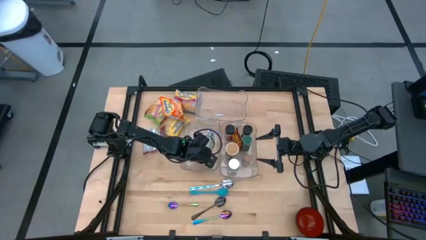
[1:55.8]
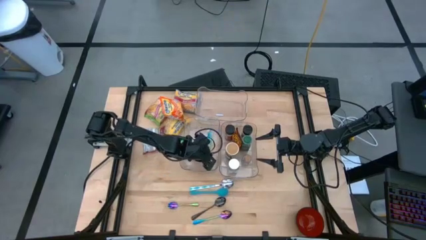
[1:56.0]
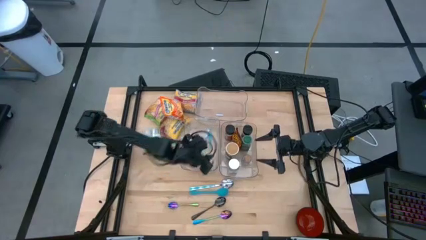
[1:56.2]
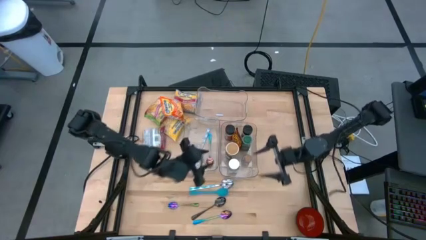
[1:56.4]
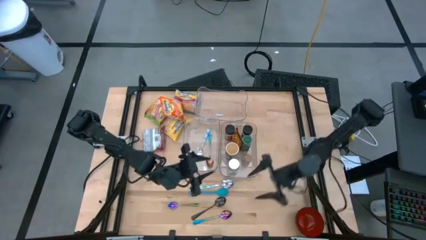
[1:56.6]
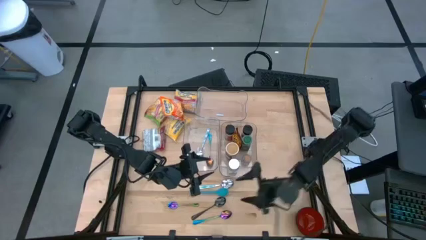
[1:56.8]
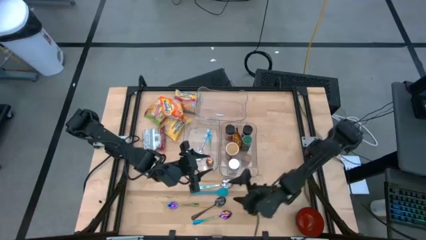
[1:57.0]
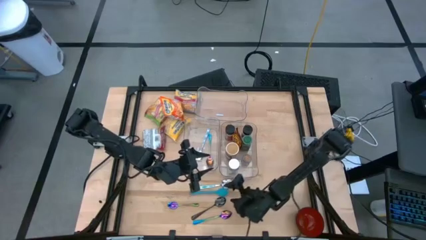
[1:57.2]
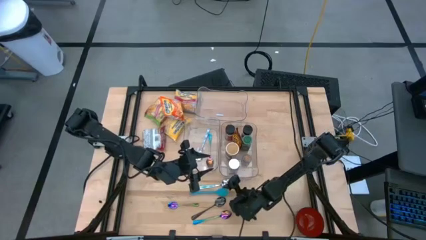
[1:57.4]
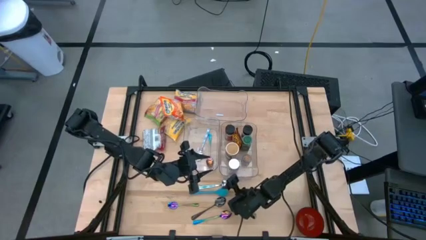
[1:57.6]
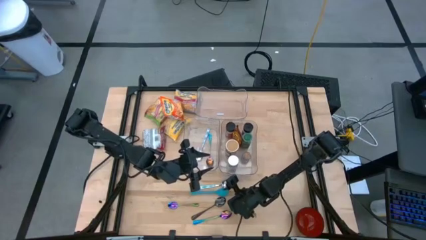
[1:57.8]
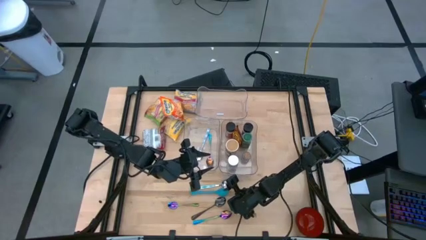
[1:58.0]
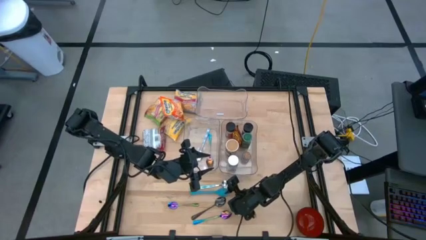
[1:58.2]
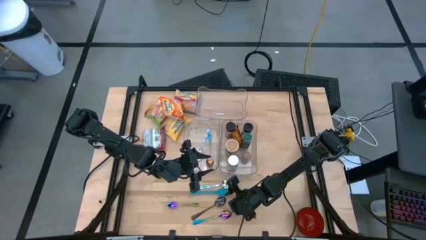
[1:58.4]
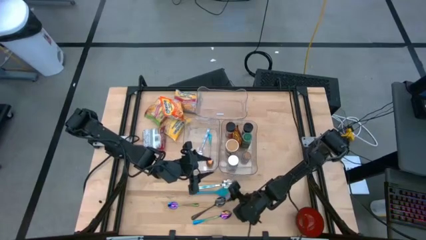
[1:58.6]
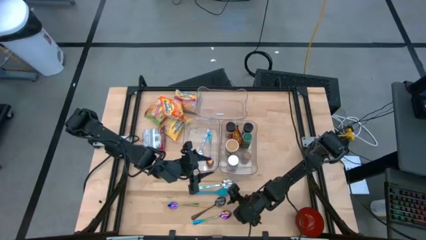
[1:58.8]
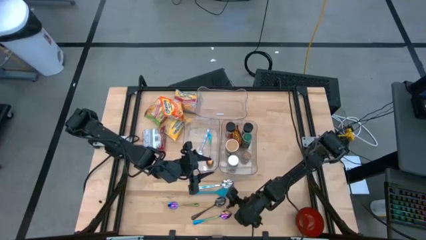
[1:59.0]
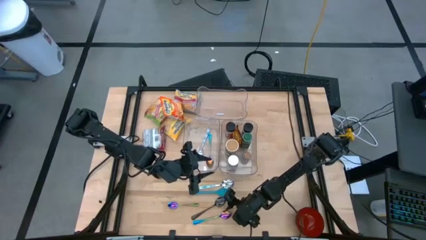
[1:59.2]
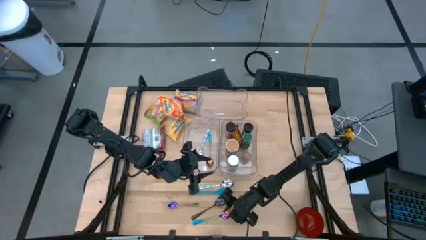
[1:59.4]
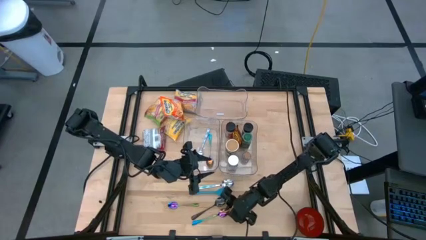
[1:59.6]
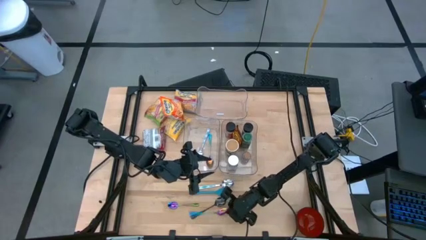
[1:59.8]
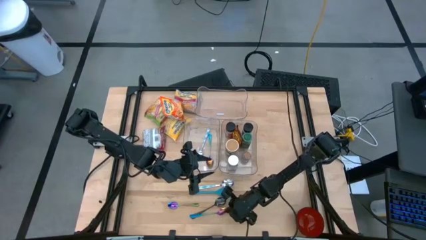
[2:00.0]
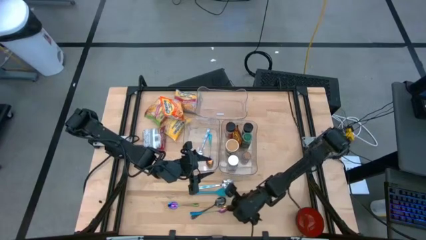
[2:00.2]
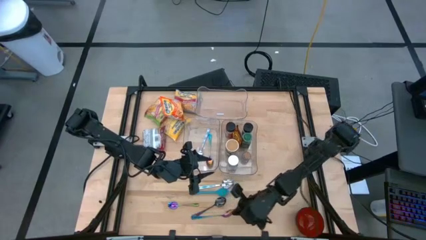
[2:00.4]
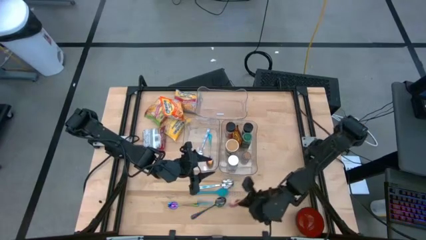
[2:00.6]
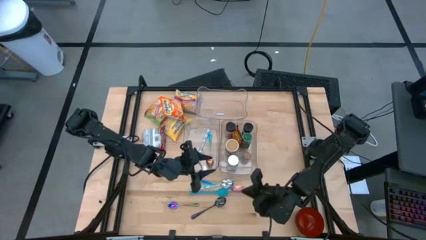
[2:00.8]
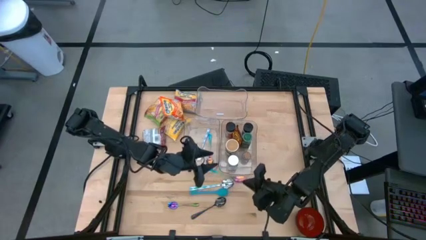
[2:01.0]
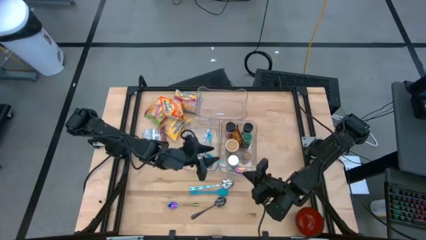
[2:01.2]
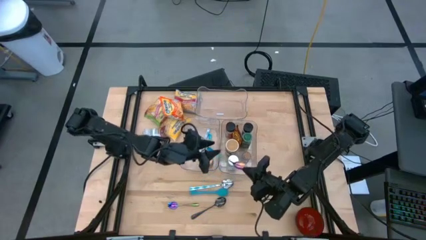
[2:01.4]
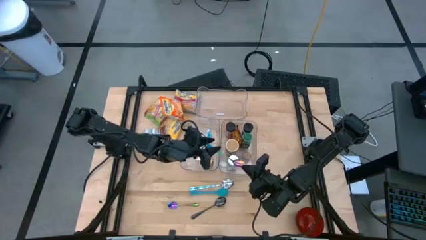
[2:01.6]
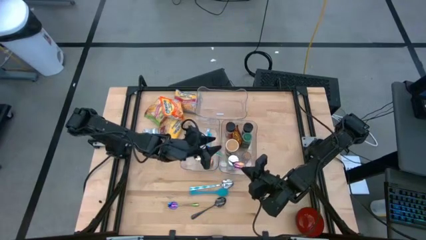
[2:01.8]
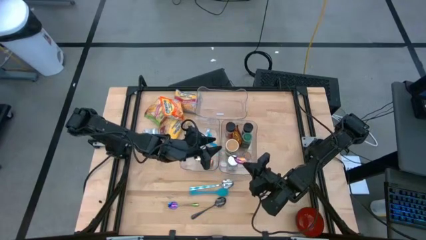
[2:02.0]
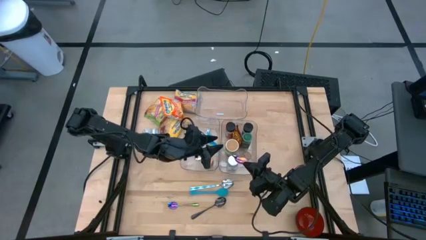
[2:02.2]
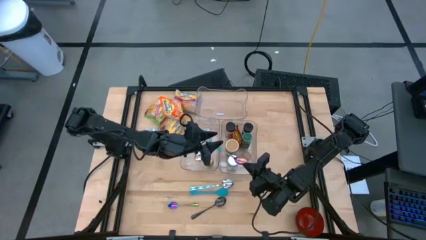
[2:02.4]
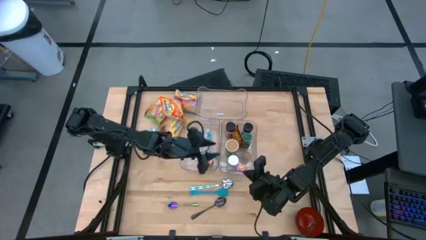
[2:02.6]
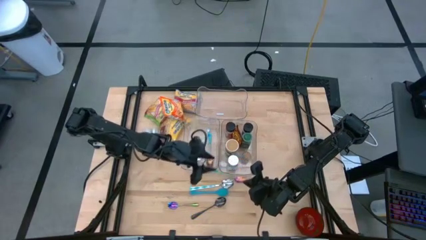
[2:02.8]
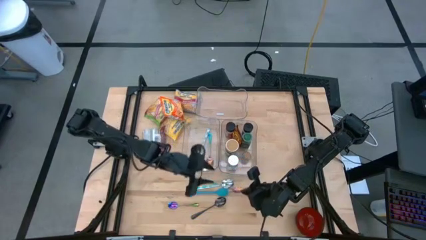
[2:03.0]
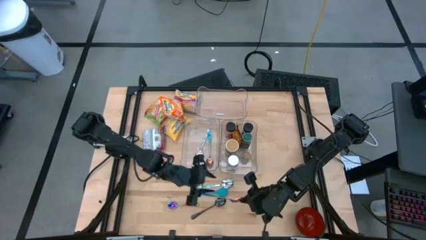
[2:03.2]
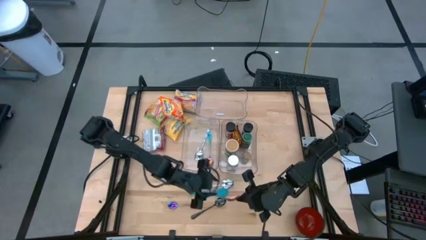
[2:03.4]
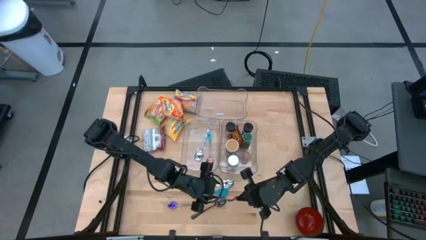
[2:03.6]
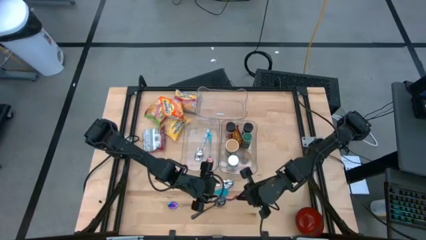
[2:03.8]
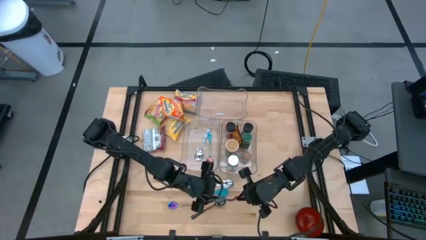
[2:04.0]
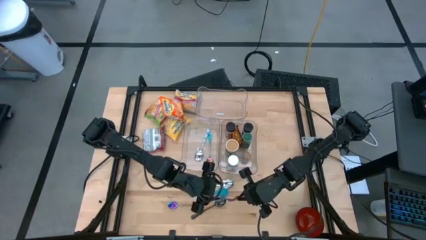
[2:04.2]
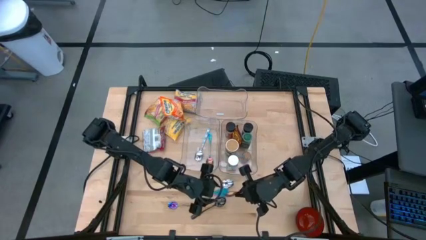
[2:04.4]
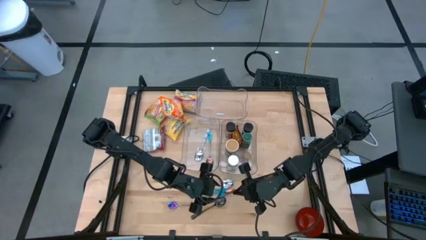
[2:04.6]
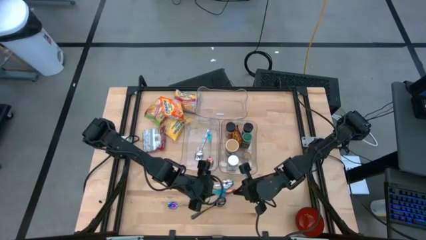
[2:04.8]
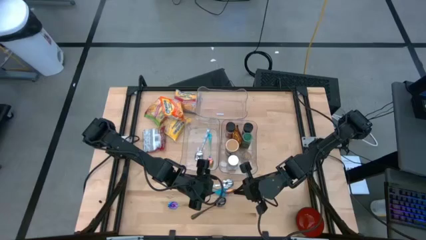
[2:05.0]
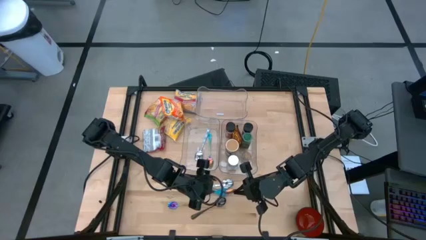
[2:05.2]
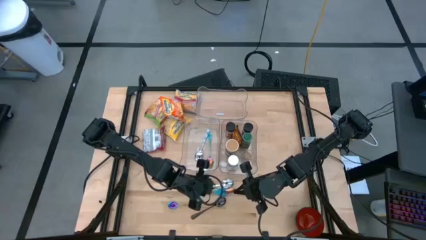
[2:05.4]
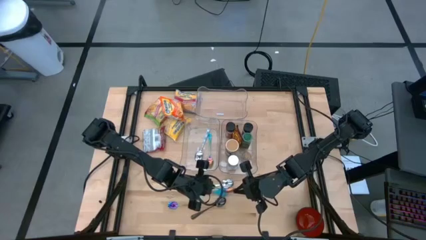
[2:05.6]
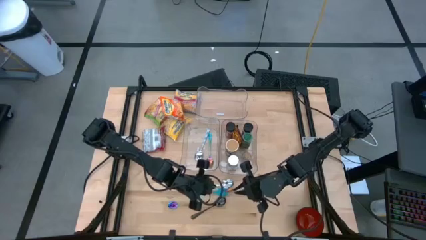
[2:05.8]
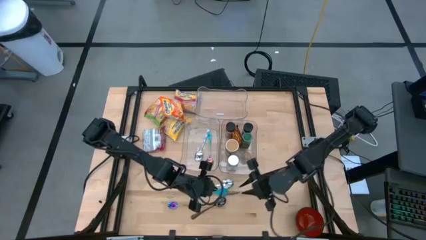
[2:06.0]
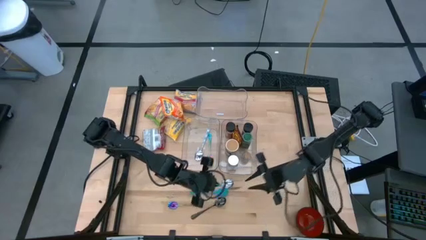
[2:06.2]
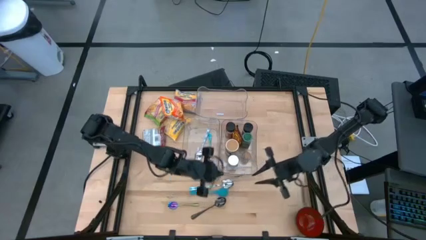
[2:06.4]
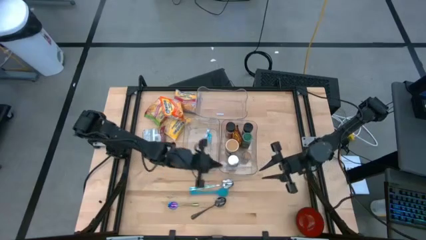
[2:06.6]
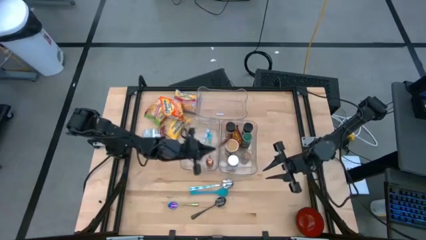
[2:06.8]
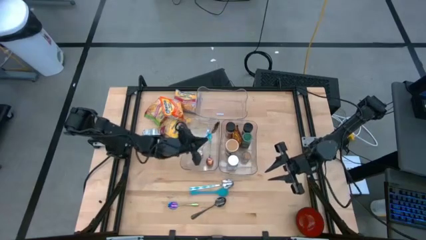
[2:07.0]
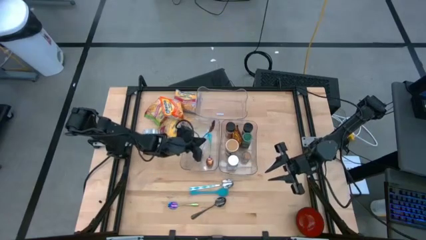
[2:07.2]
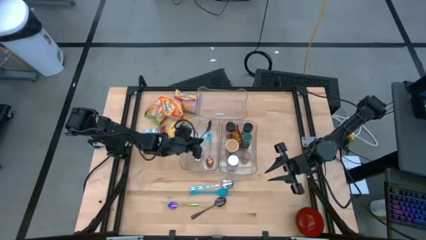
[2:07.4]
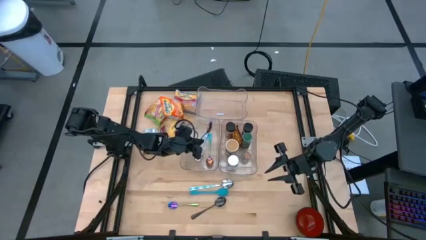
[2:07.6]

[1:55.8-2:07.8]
Task: Pick & Place Food Item
Put the blue green spoon into the bottom left transparent bin

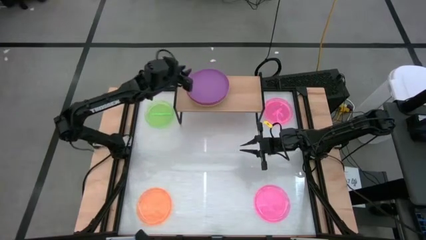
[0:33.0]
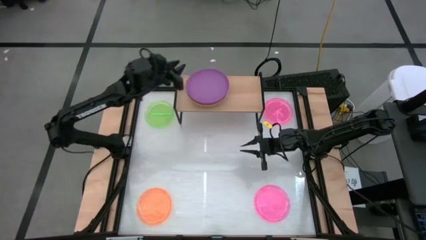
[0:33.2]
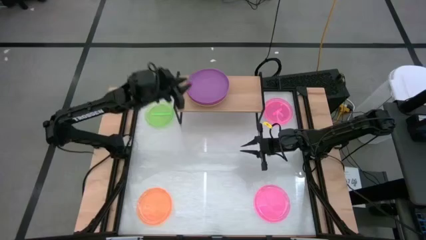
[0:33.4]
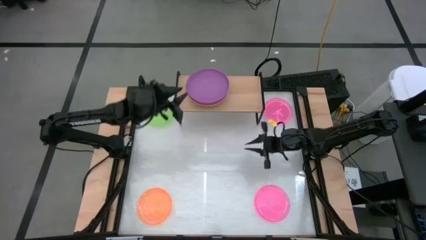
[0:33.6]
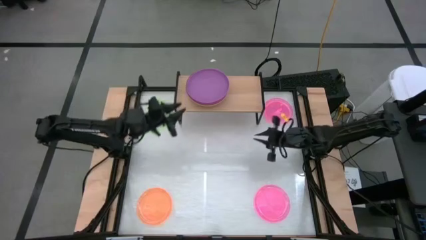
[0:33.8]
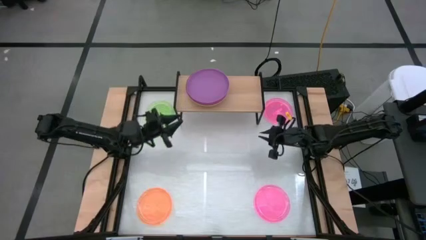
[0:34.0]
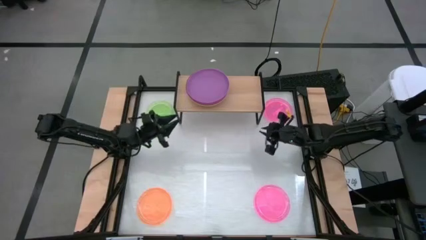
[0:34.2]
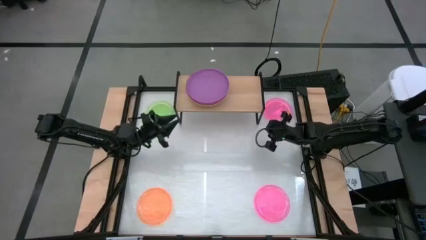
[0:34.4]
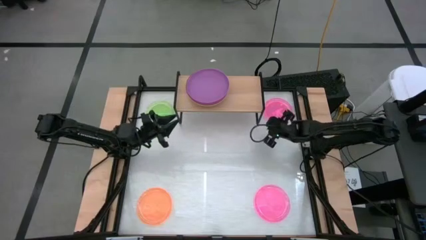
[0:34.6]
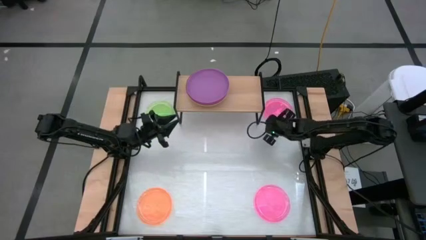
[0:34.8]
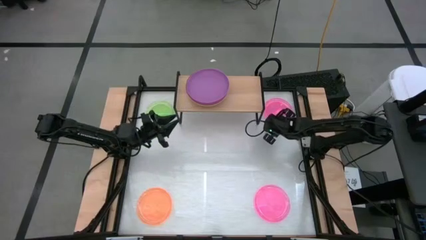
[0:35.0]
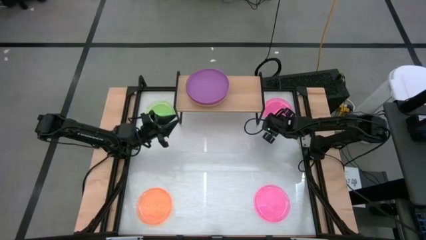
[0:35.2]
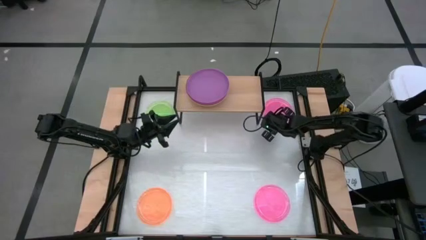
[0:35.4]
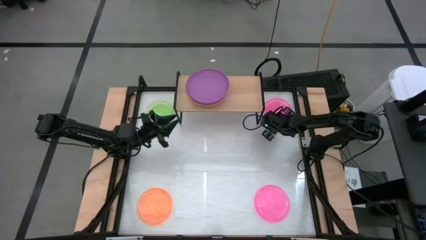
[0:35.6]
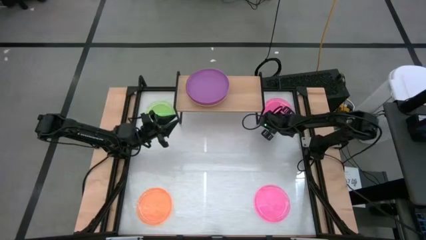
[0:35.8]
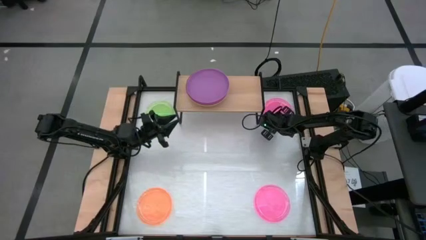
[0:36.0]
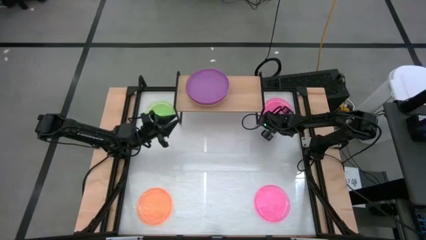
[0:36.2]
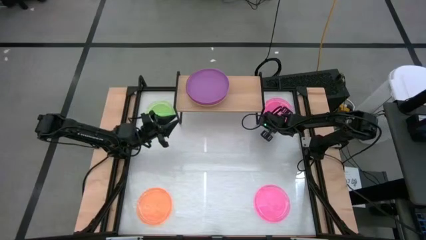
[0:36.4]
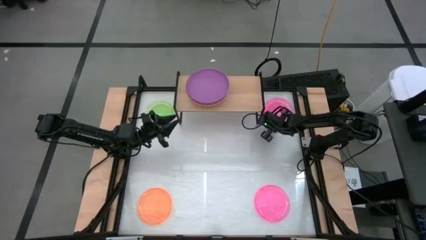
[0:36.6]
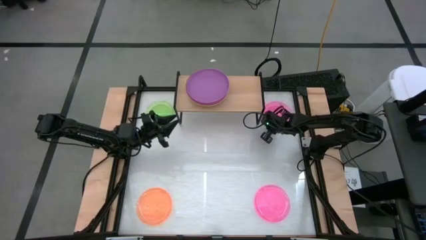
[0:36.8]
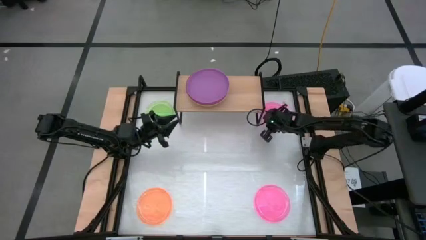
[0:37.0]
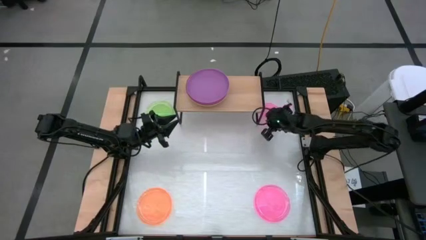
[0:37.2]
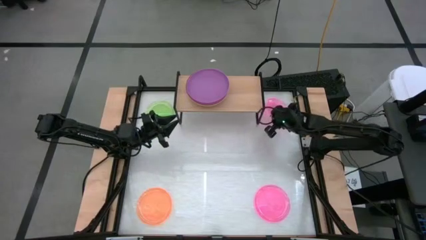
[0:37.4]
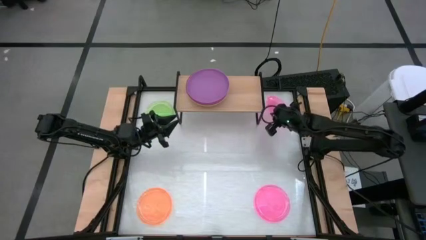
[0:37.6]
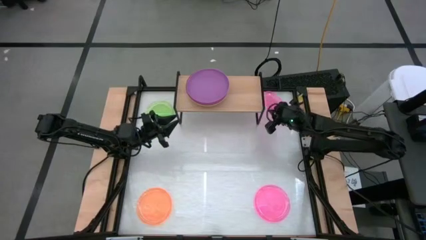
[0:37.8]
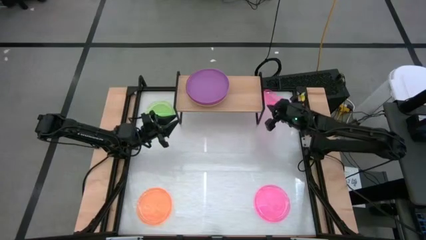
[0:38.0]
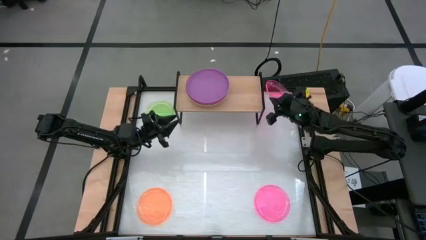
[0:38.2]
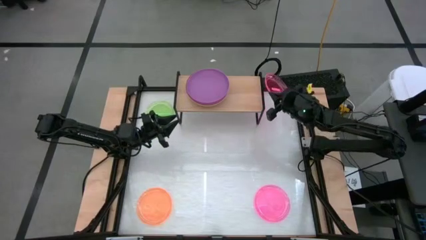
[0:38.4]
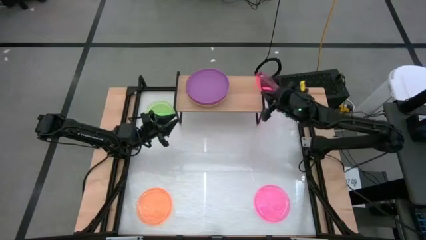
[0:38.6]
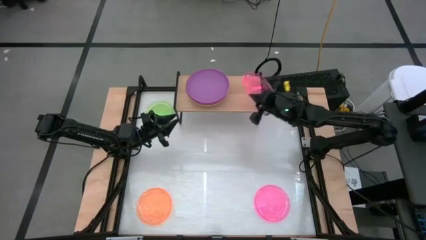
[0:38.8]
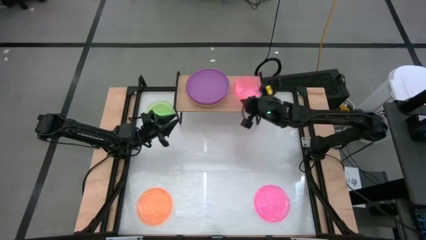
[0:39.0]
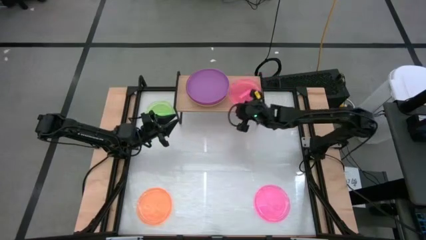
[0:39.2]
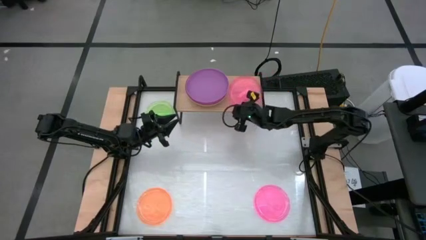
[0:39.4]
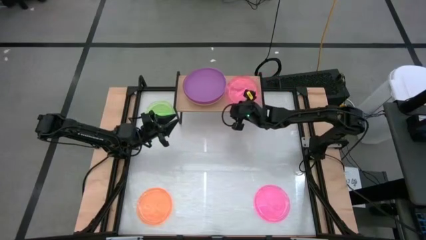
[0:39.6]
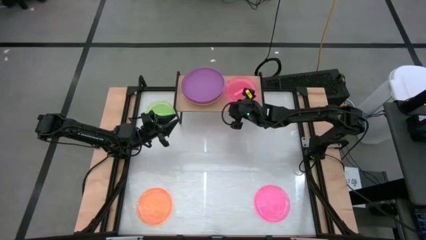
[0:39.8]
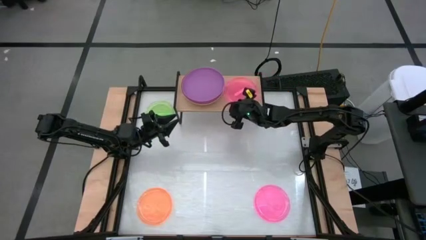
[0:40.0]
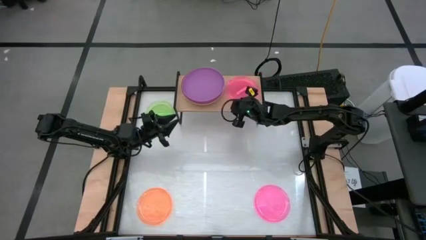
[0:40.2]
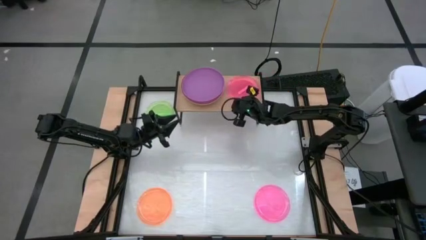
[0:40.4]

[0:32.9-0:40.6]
Task: Place and stack plates onto a shelf
Put the top light pink plate on the shelf
